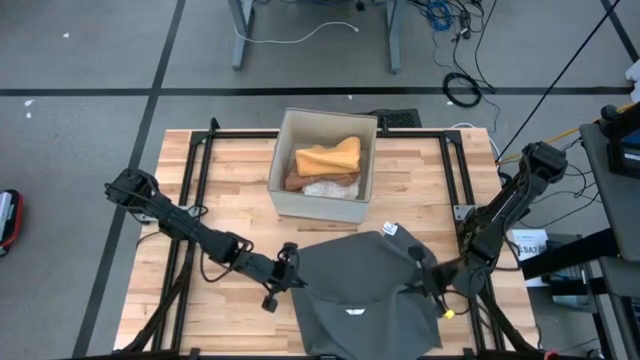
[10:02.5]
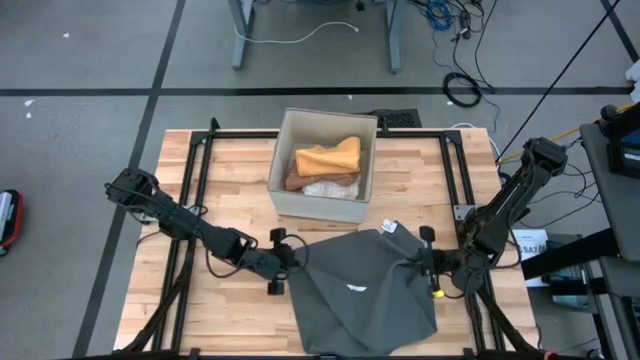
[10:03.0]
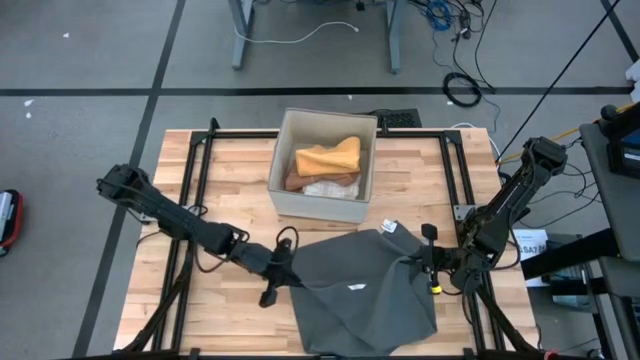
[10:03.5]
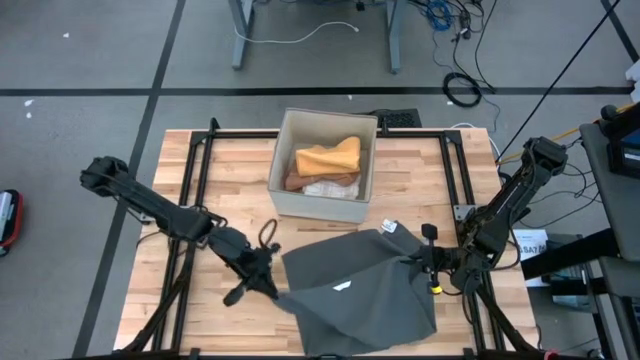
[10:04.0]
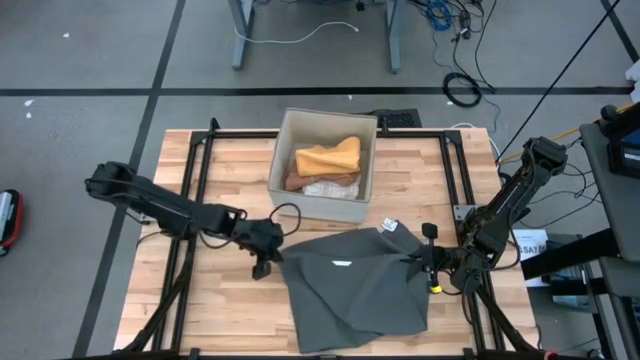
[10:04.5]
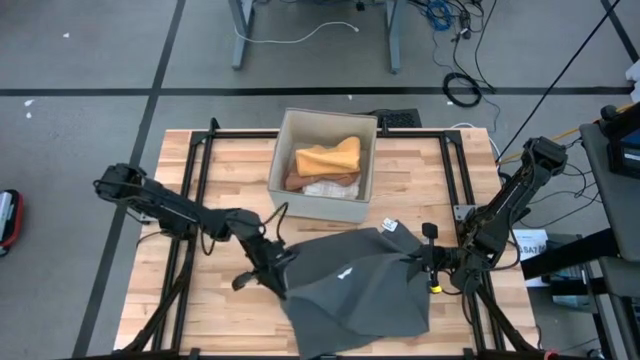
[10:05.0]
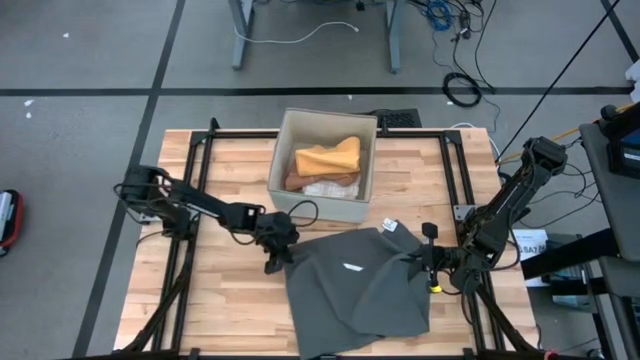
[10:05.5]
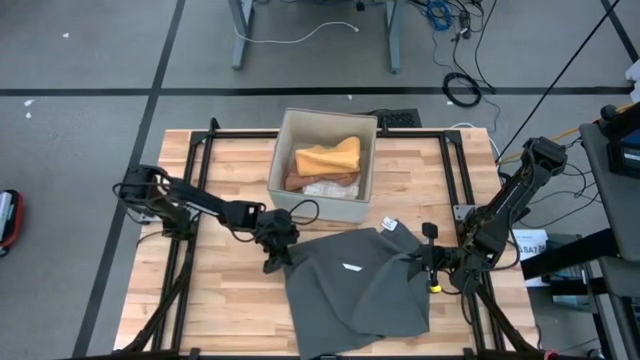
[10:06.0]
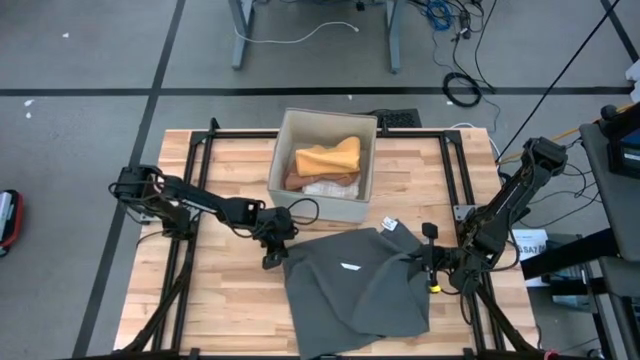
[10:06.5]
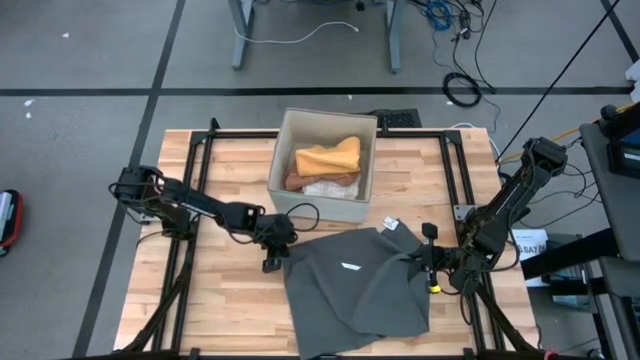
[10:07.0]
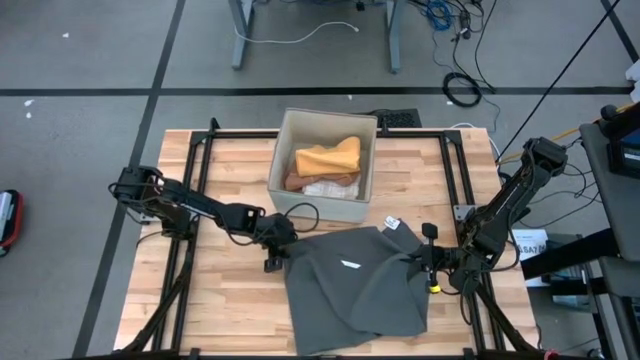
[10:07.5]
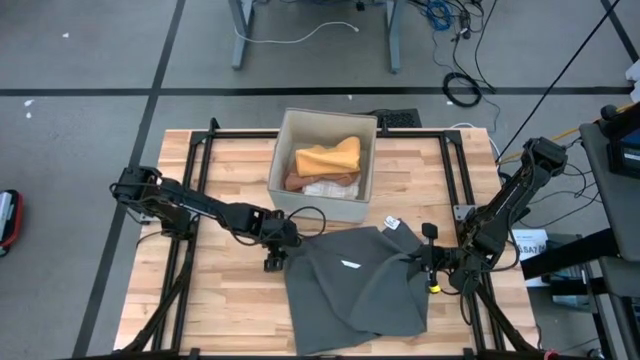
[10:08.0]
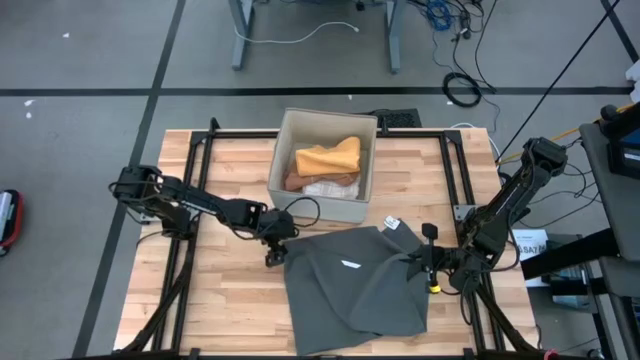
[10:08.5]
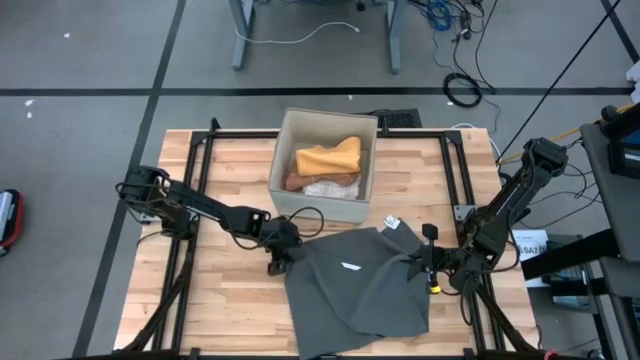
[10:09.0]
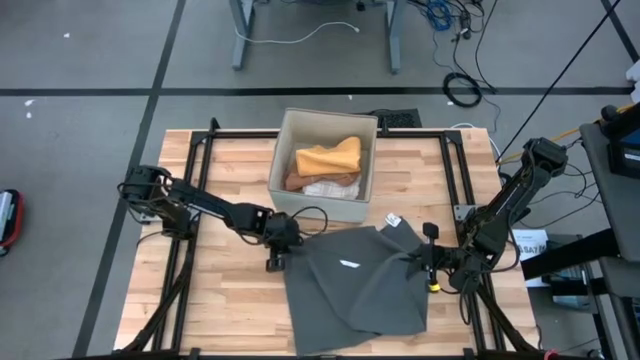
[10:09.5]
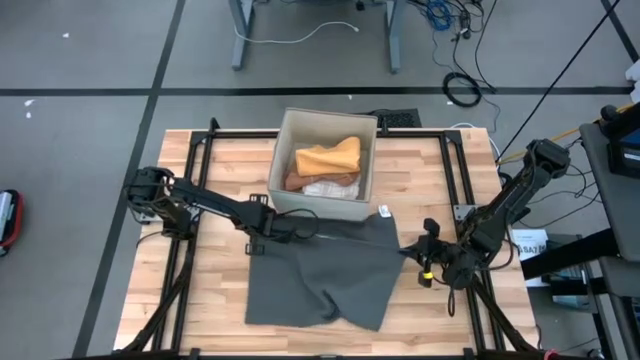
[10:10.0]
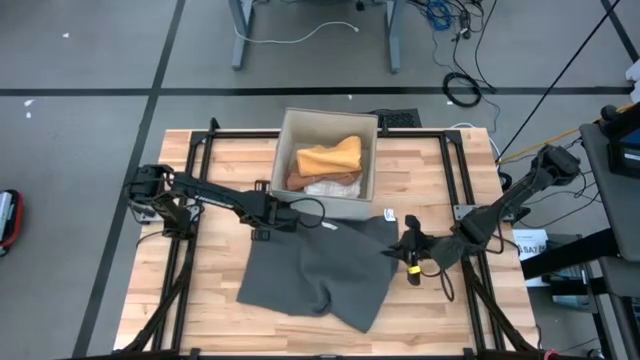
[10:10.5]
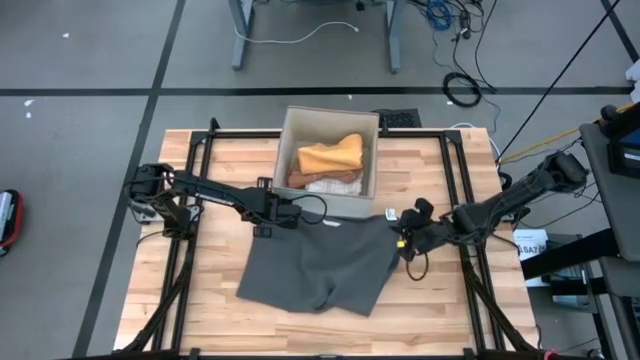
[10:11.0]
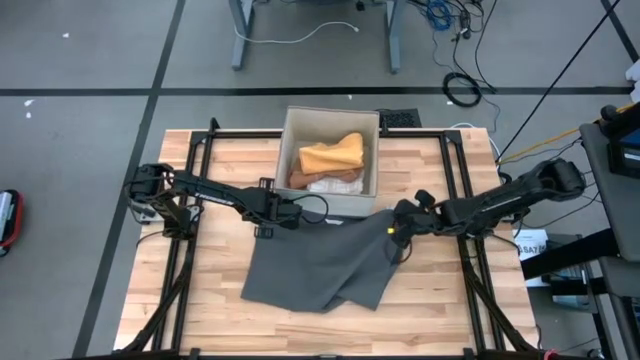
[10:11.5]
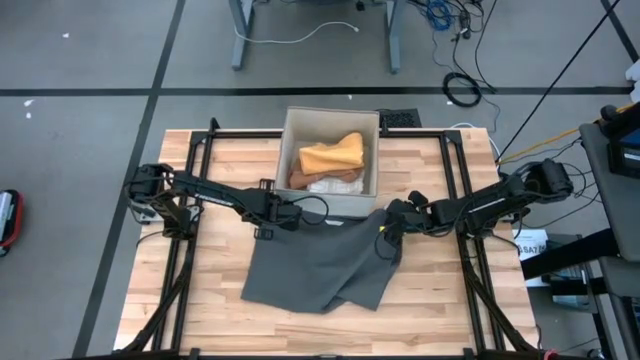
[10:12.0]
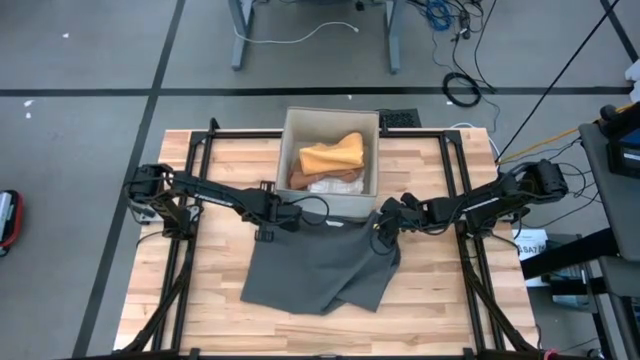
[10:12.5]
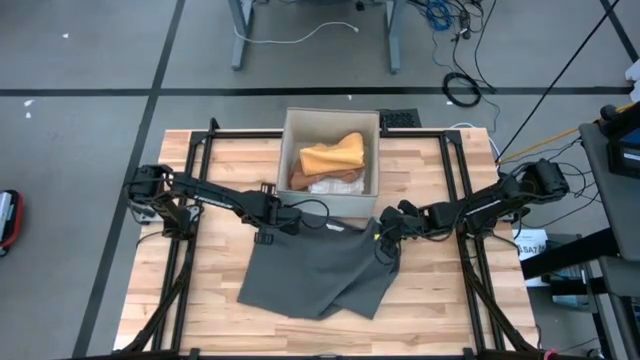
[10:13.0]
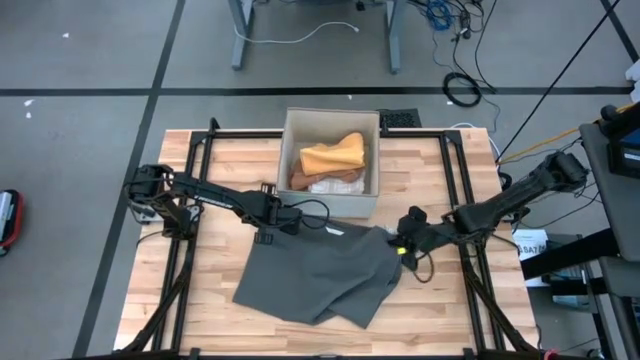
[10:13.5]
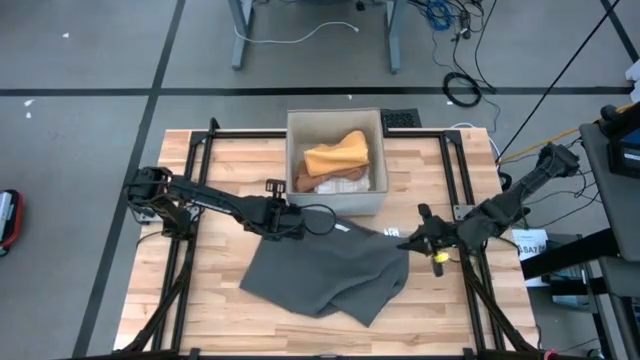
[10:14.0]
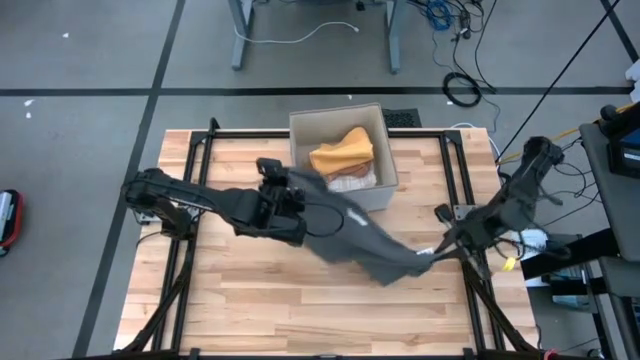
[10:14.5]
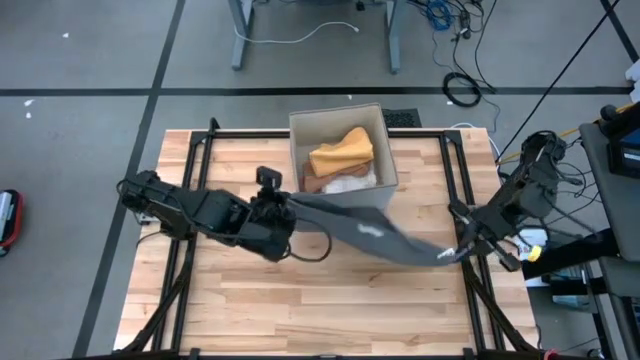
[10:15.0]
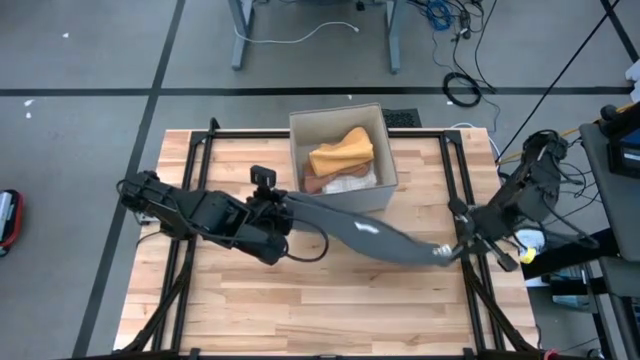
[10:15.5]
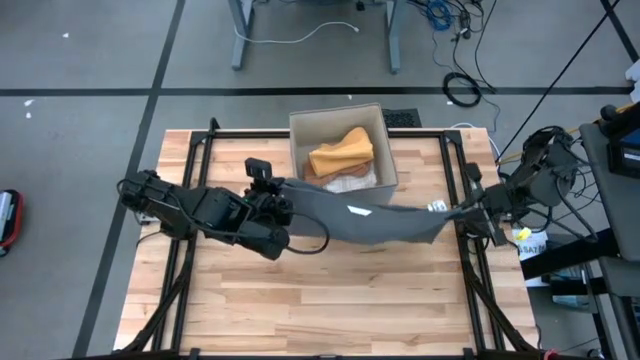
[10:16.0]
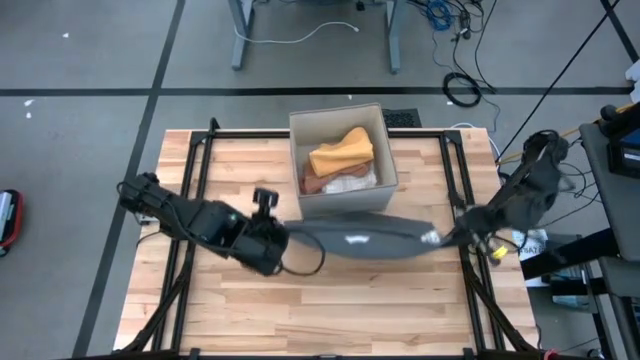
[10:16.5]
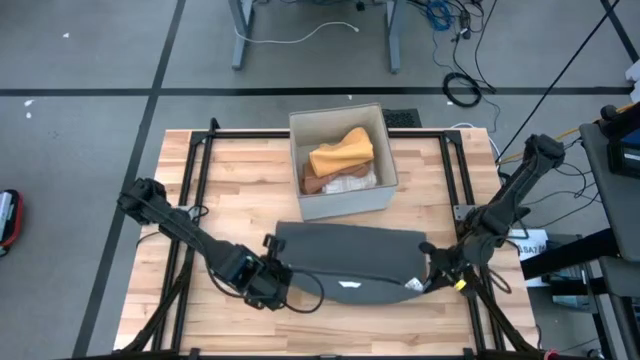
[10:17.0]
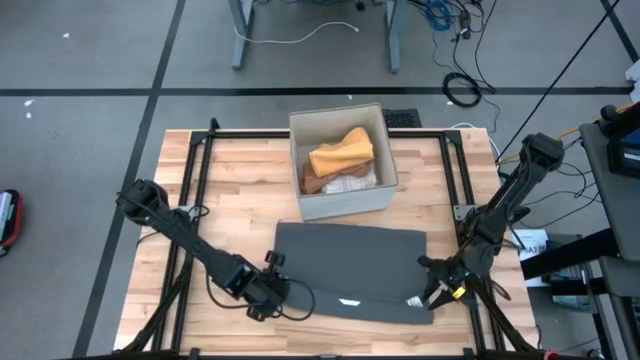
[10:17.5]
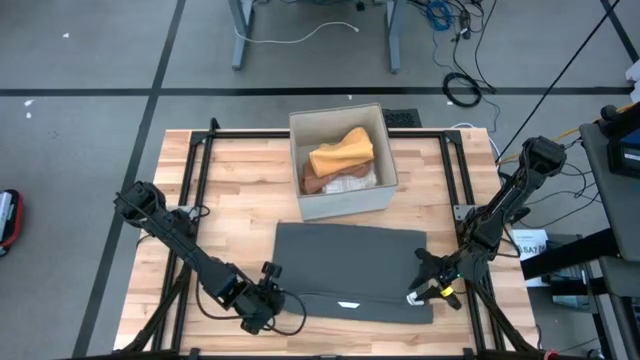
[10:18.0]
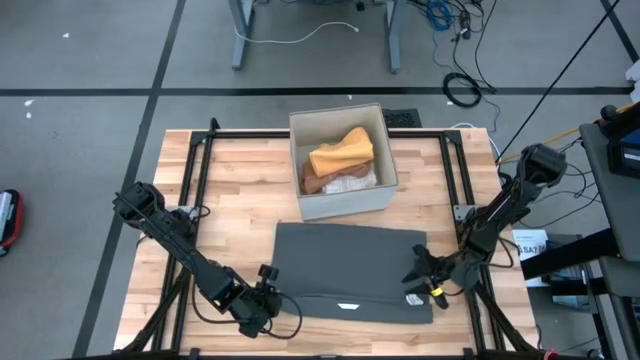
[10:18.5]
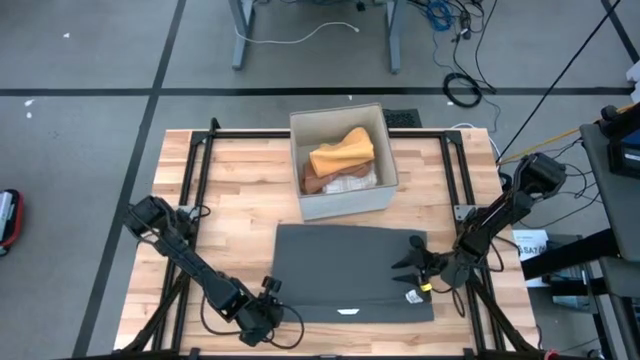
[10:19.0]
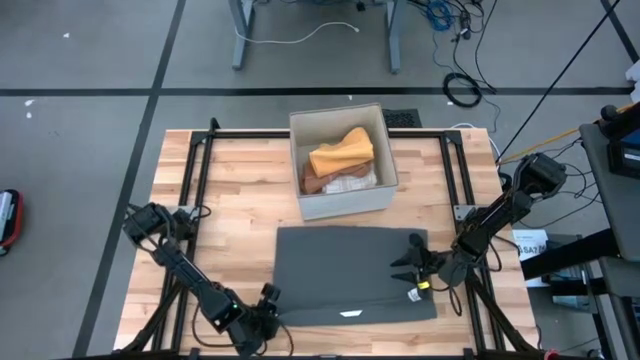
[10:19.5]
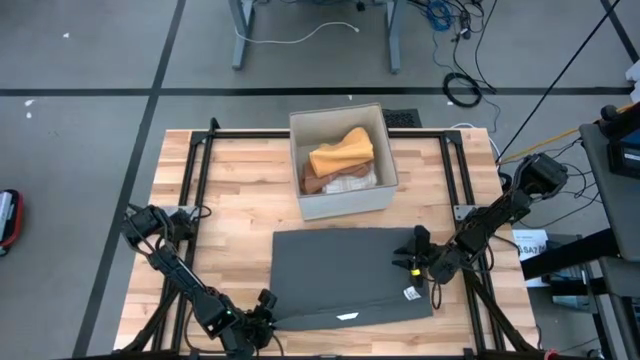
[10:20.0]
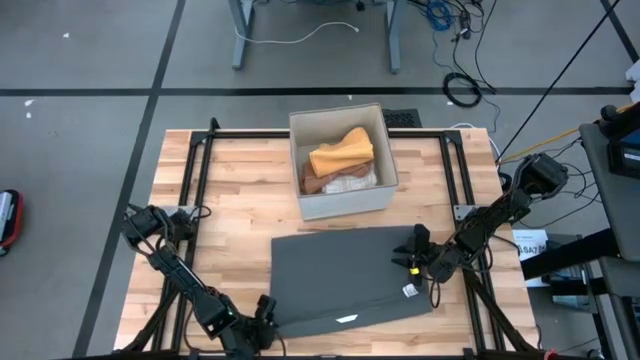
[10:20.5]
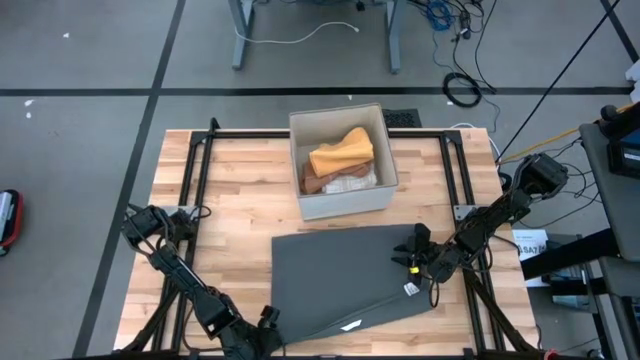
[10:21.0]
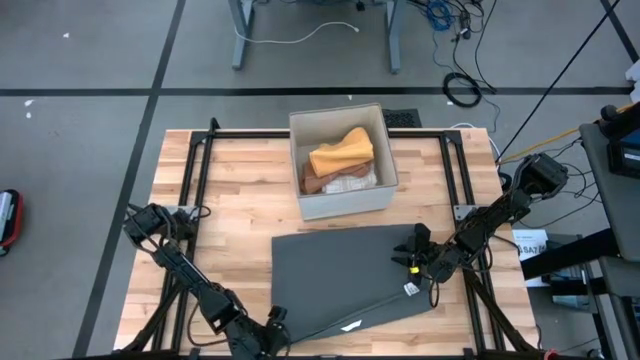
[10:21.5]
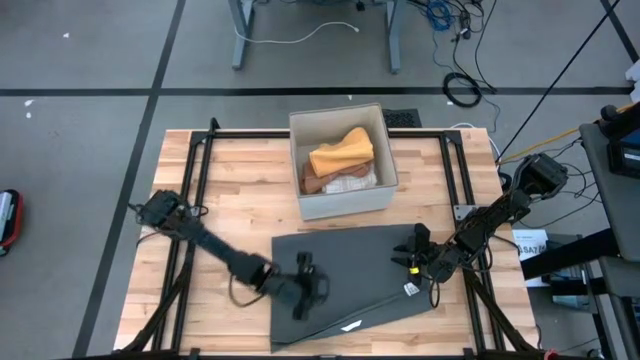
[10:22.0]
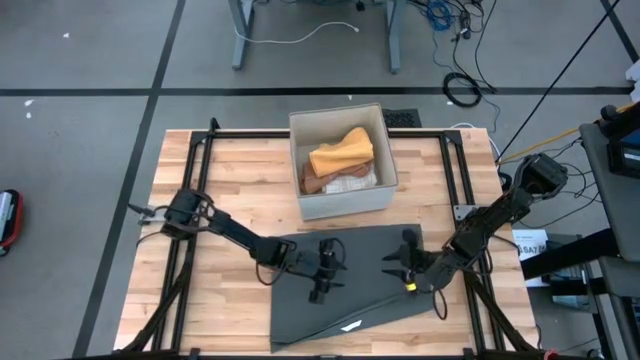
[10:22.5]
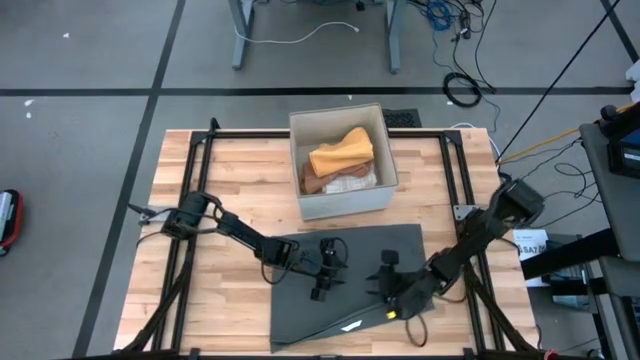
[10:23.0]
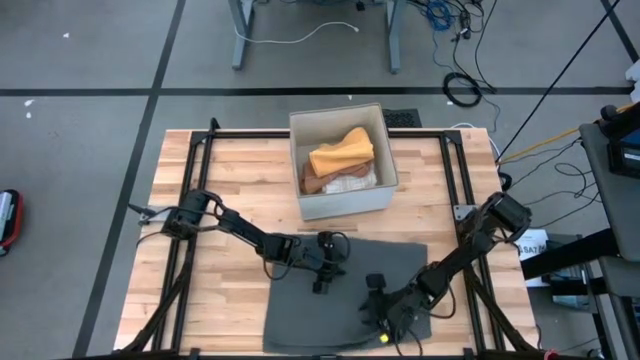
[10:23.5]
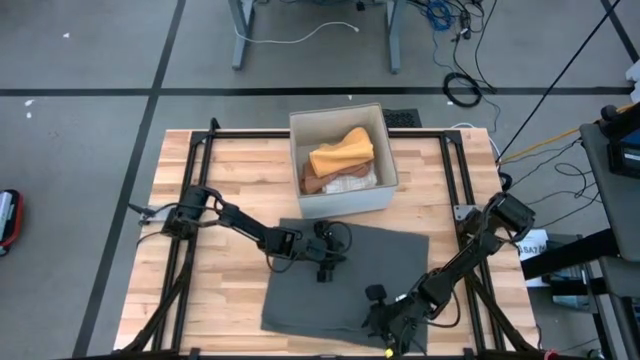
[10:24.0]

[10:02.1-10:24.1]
Task: Fold towel
Fold the orange towel
